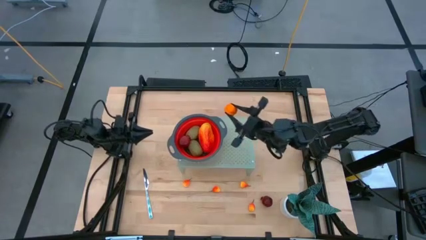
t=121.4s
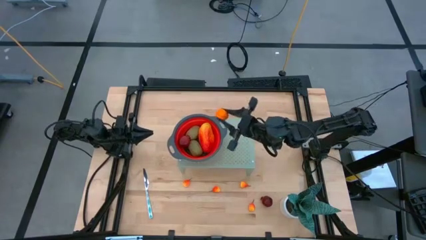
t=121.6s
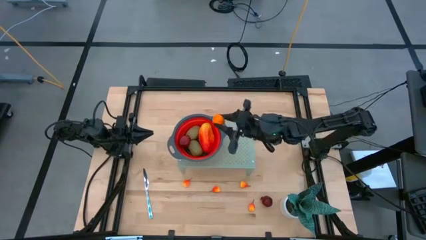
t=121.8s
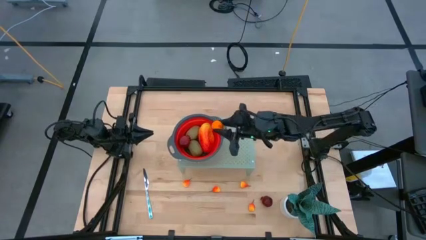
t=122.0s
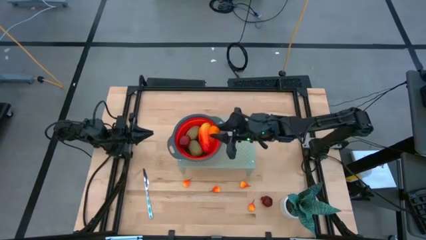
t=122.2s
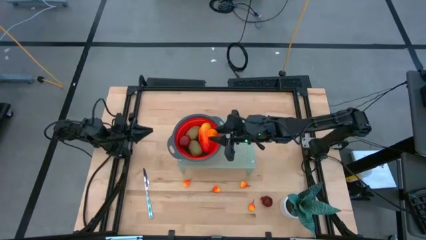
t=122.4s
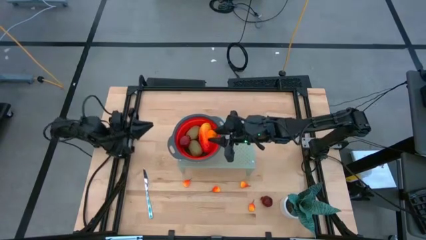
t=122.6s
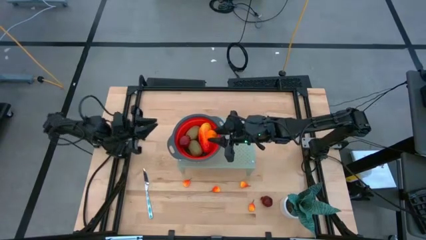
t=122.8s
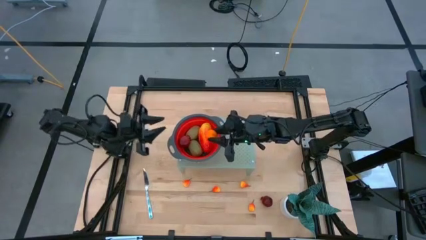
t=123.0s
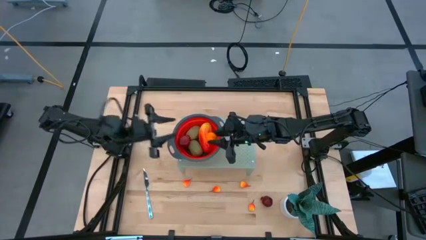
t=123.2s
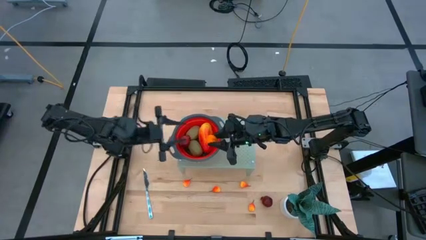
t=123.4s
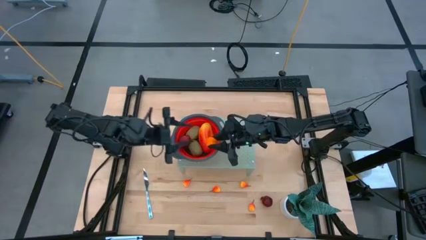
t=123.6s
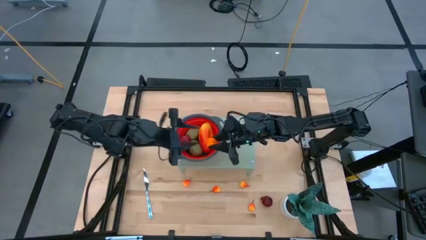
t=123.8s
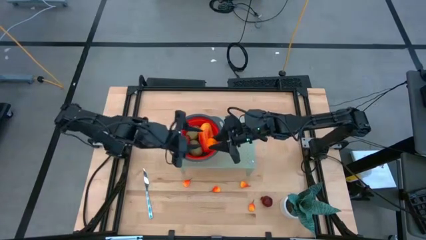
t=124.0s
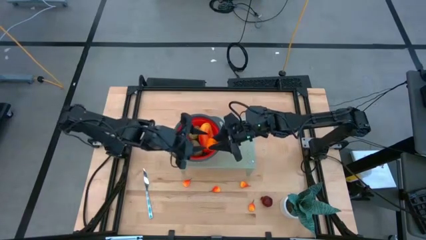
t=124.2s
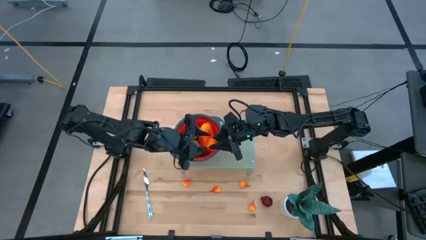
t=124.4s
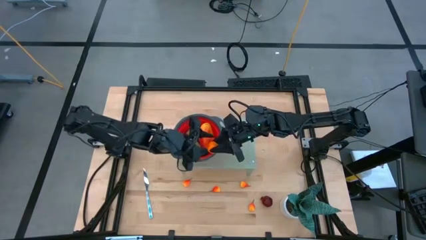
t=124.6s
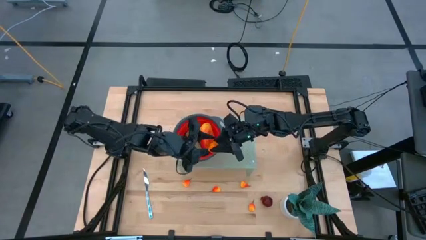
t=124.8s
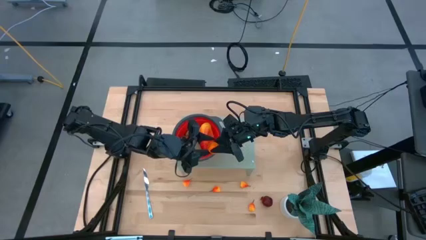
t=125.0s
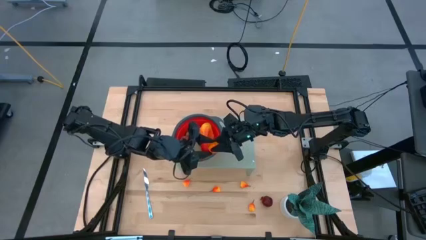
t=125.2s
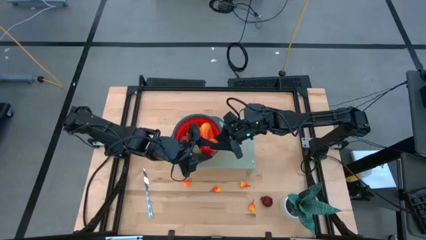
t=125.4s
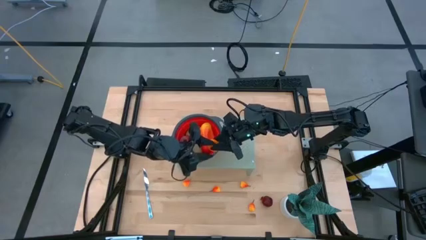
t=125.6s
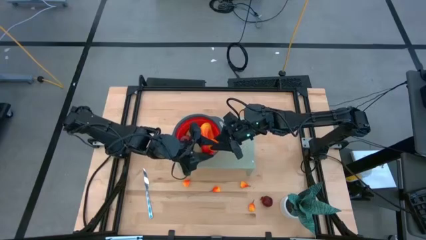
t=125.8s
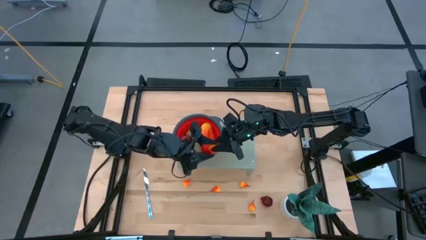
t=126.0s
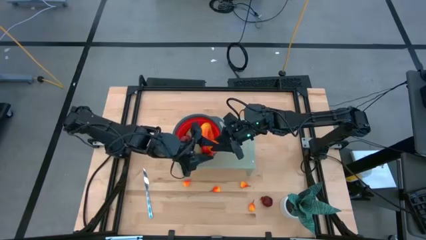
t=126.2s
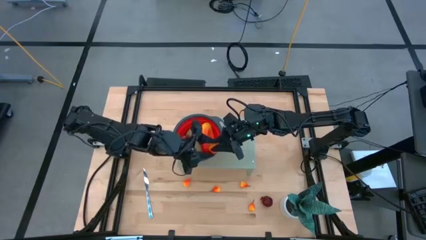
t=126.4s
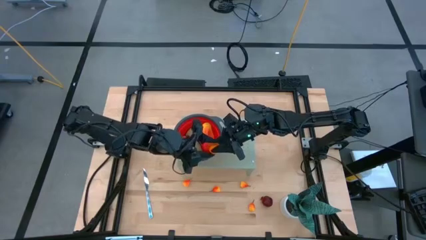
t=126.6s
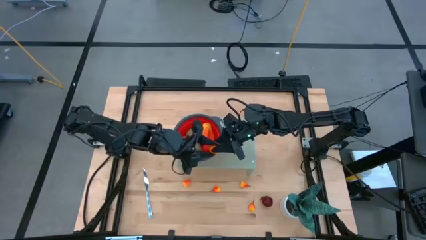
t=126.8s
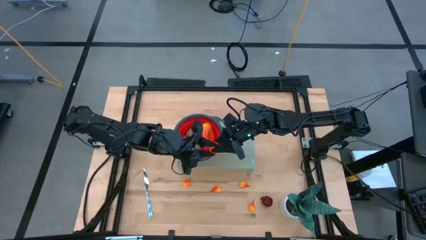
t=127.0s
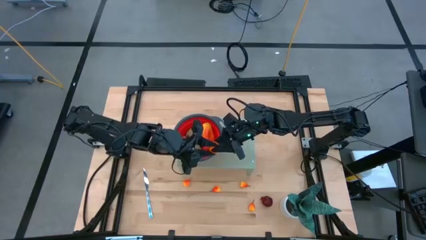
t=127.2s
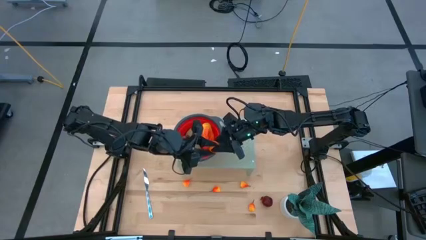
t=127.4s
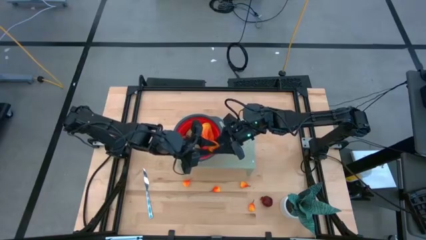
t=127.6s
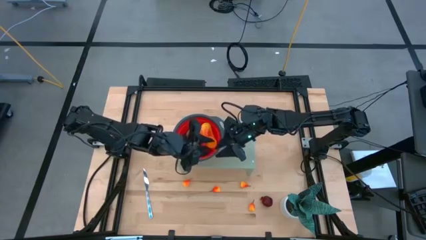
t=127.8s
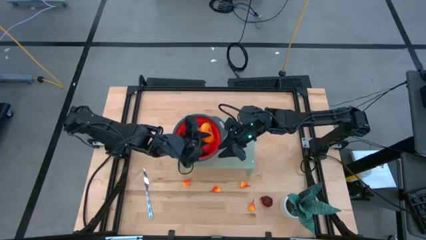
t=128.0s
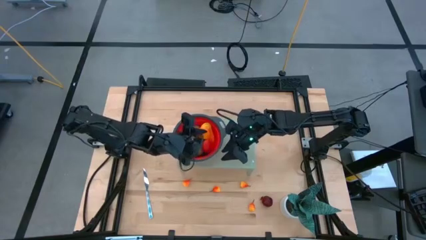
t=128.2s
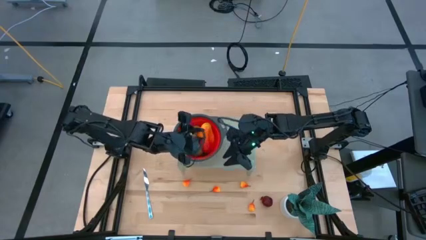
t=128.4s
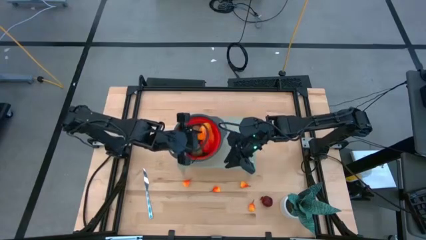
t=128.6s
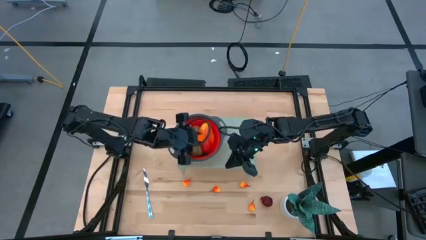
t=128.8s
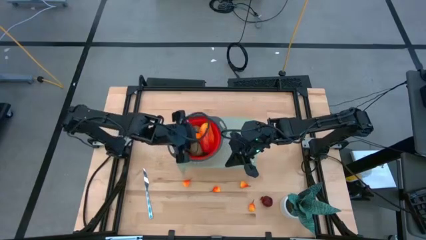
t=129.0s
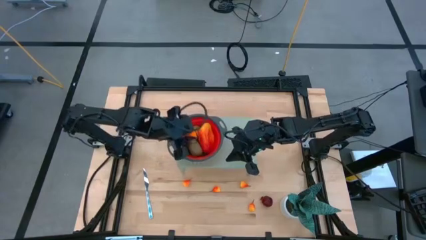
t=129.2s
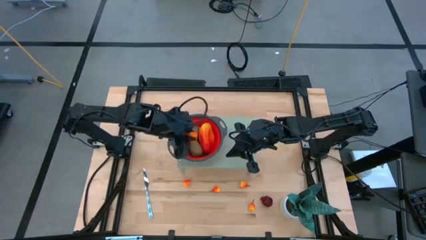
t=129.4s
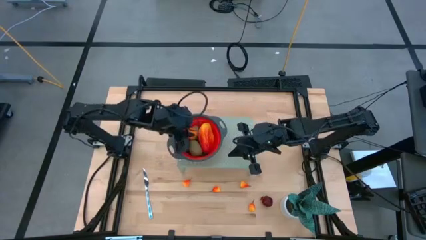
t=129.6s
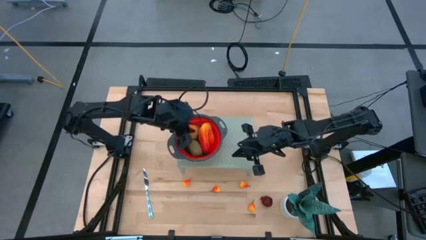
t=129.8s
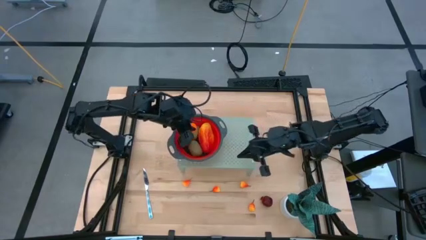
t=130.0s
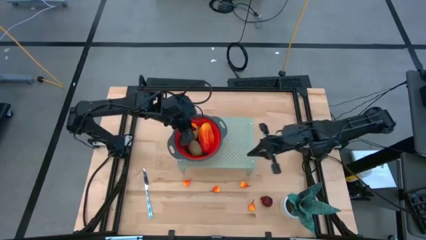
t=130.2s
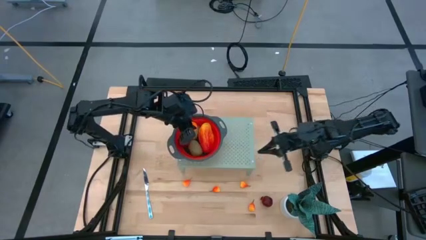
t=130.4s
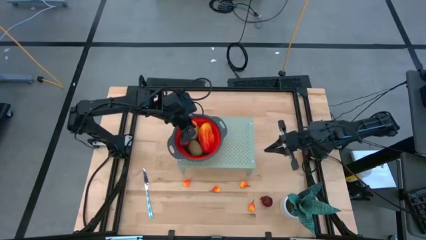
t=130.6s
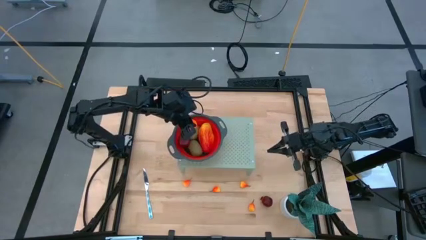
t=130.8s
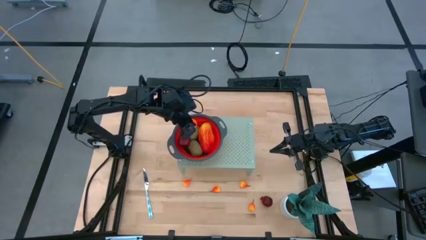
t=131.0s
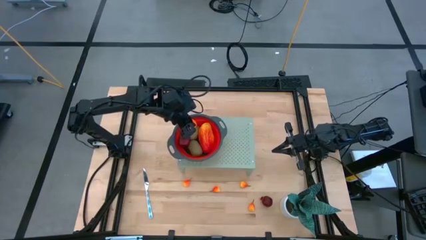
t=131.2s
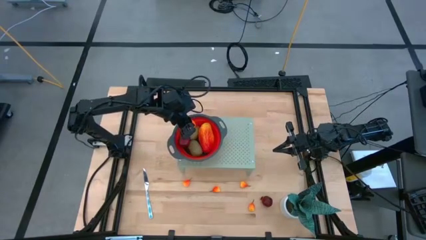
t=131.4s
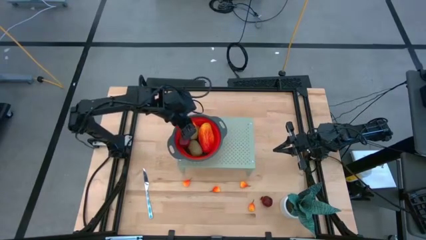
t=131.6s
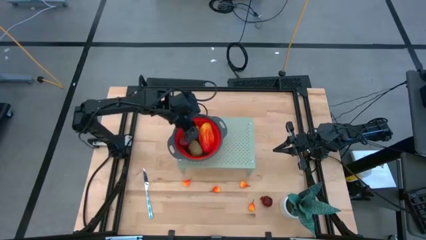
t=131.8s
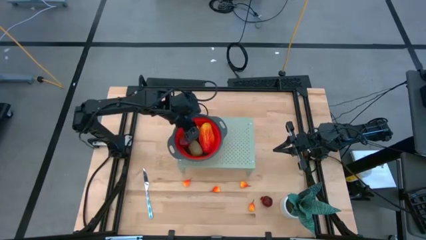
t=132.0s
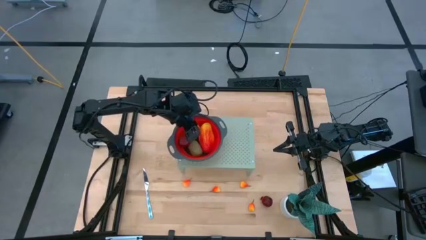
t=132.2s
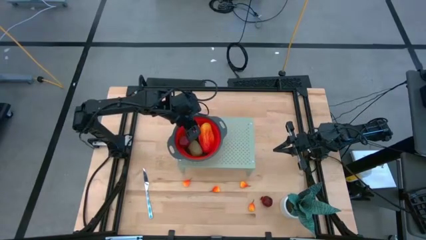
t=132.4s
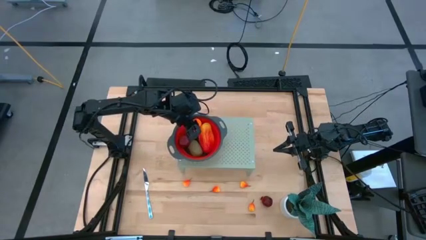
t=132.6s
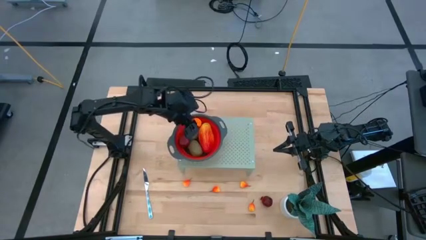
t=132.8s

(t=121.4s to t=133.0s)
Task: Pick & Place Fruit
Put the orange fruit into the strainer

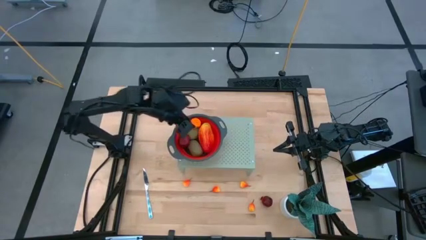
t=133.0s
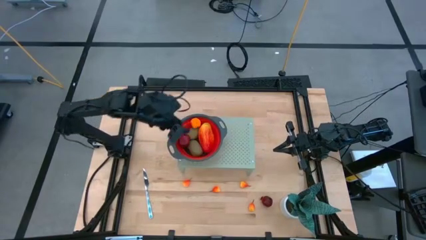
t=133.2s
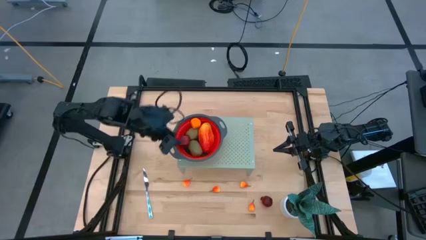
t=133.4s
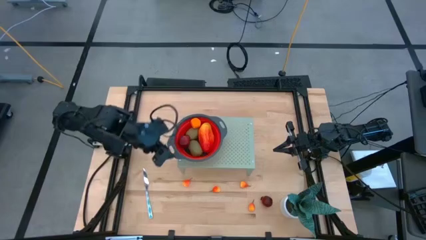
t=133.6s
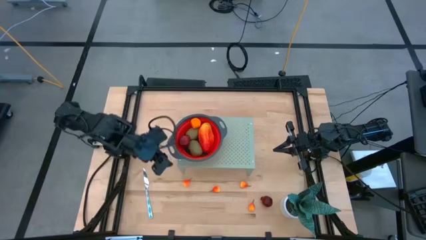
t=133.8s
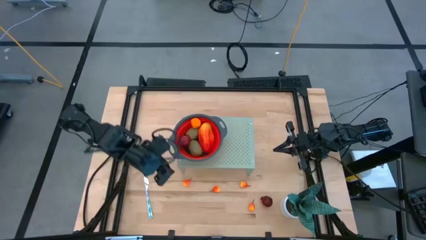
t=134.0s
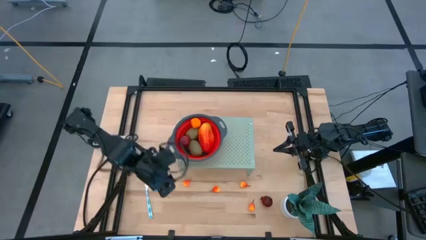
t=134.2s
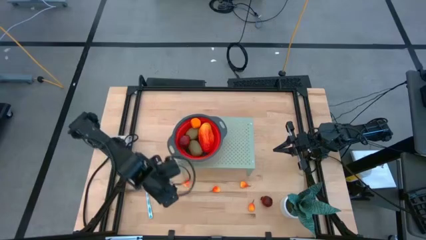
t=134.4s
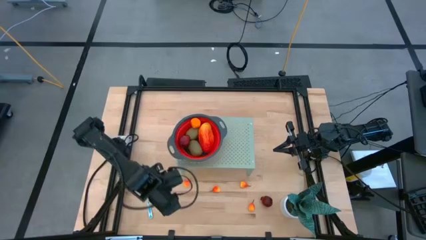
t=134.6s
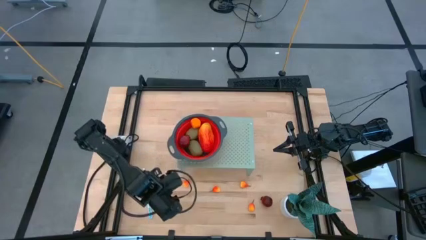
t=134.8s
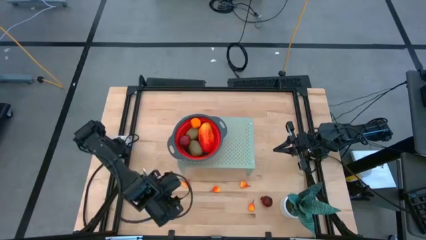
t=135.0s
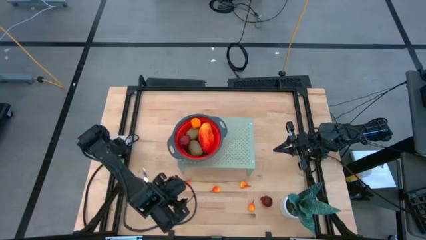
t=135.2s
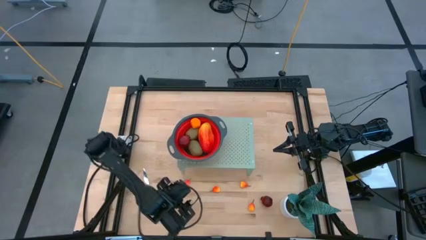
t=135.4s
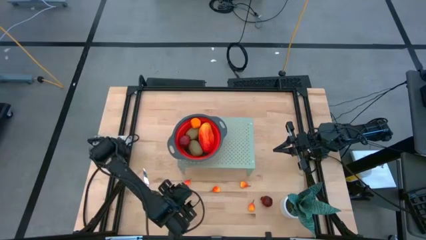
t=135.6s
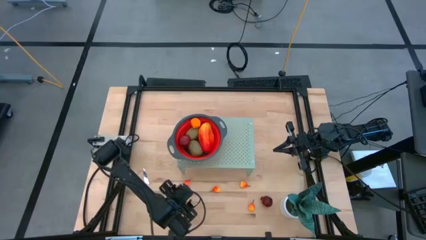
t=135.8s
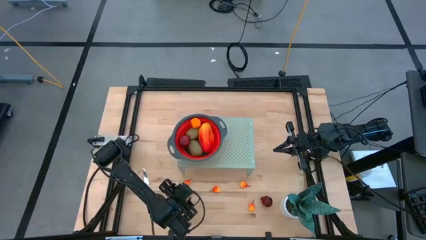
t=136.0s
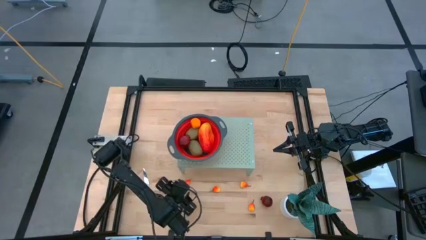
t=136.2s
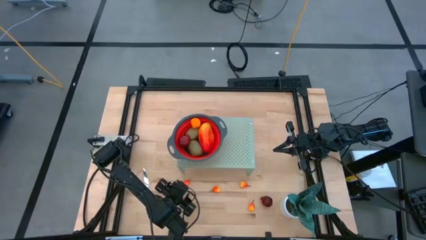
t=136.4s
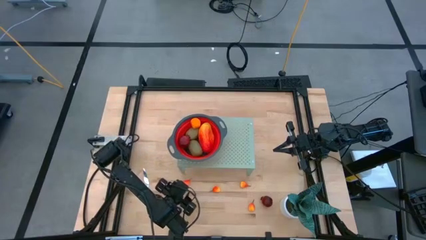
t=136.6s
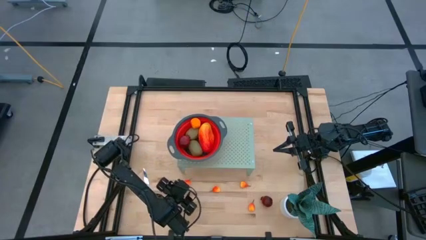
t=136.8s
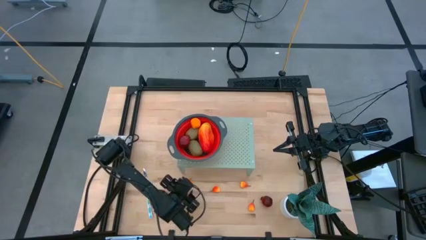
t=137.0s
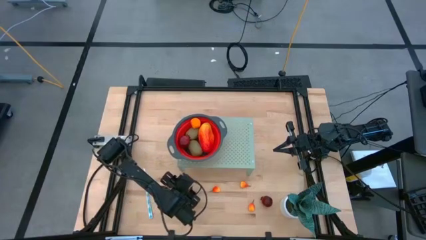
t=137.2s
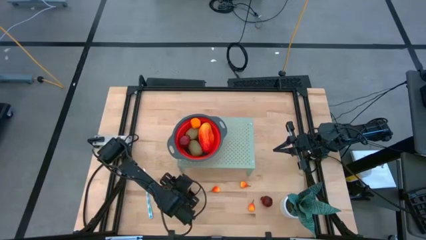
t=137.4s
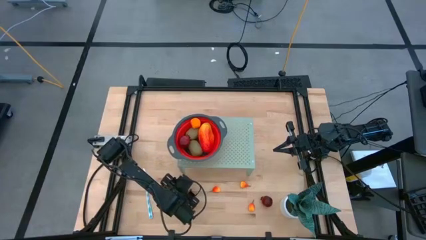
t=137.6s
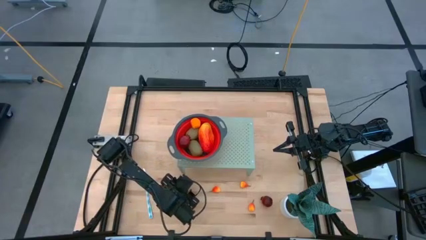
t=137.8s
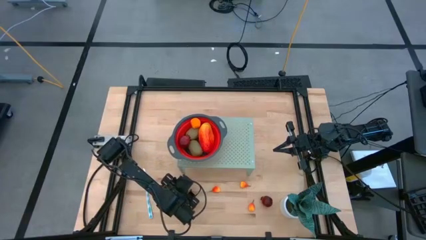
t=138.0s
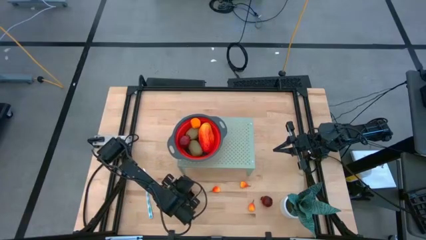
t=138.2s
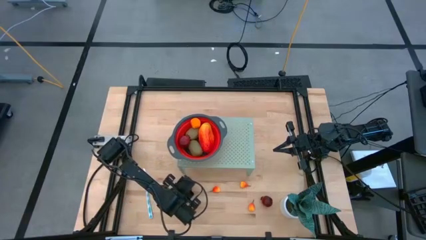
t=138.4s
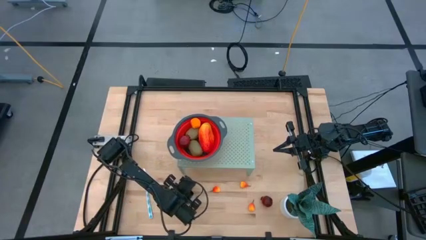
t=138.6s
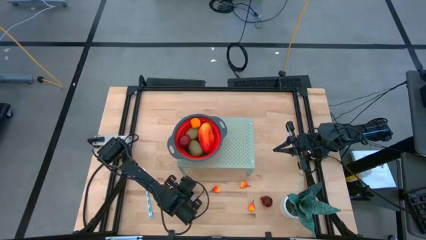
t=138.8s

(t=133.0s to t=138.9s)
Put the peach fruit into the strainer
